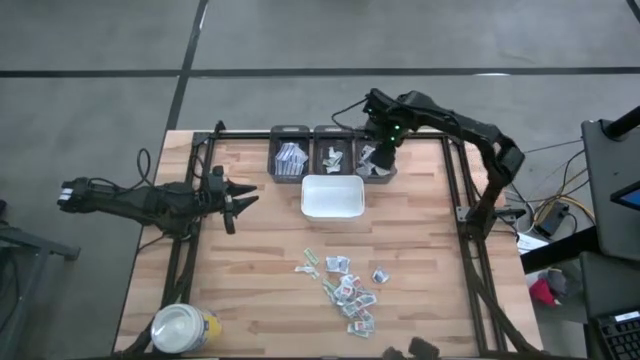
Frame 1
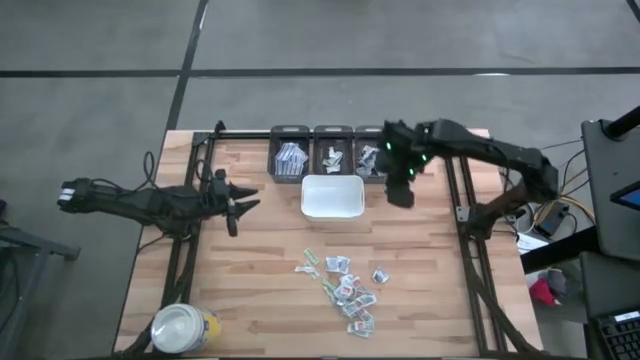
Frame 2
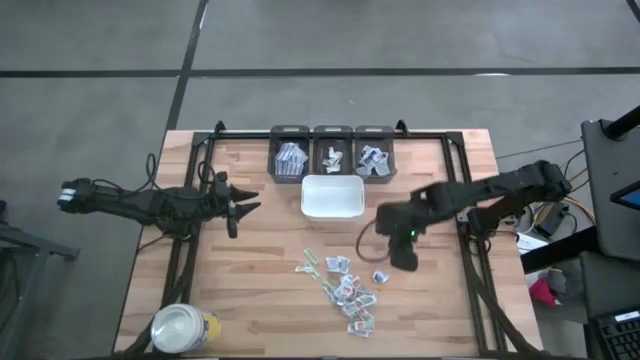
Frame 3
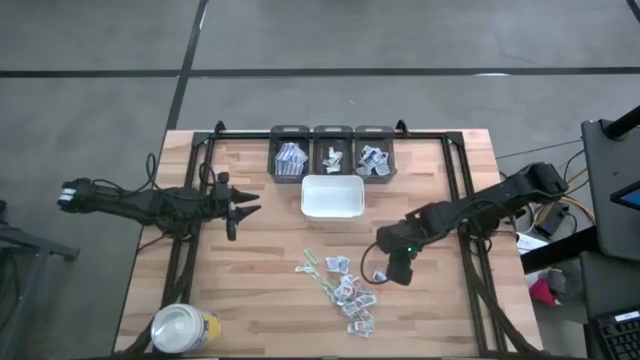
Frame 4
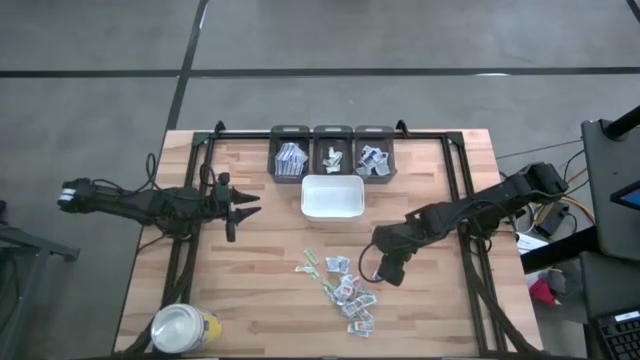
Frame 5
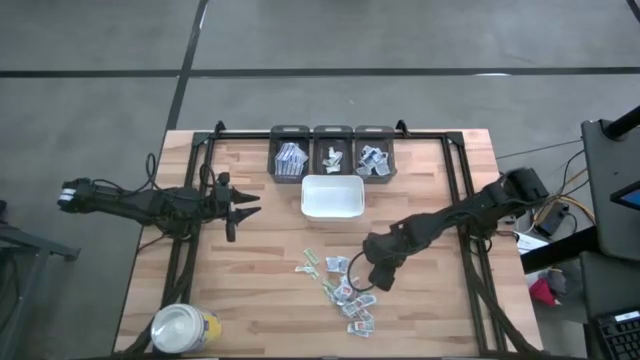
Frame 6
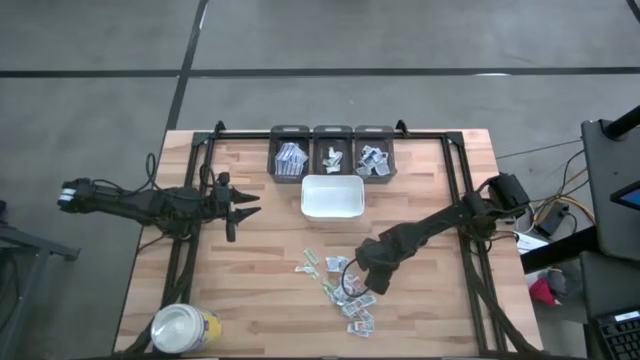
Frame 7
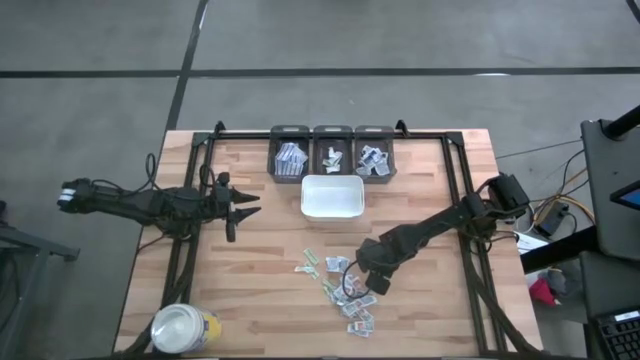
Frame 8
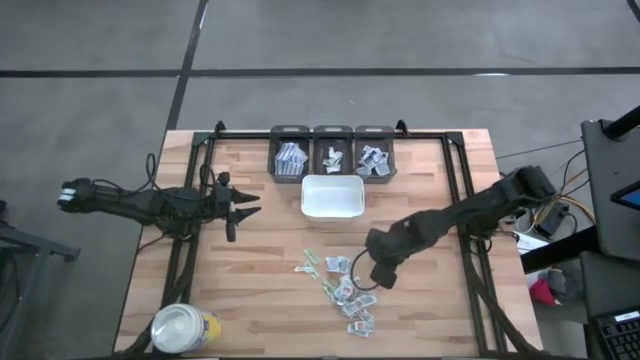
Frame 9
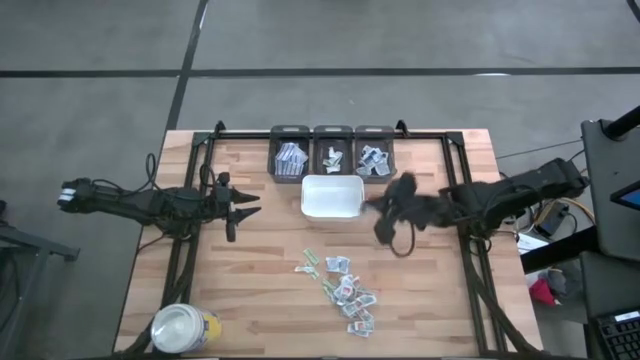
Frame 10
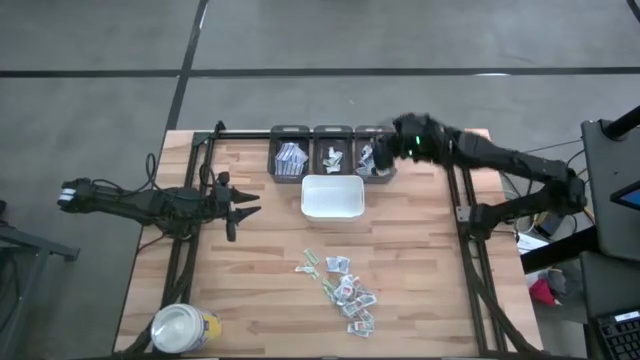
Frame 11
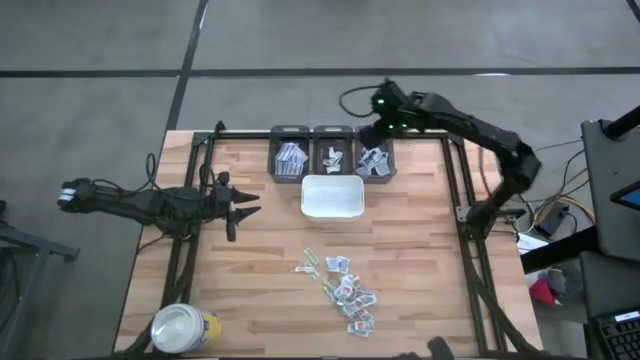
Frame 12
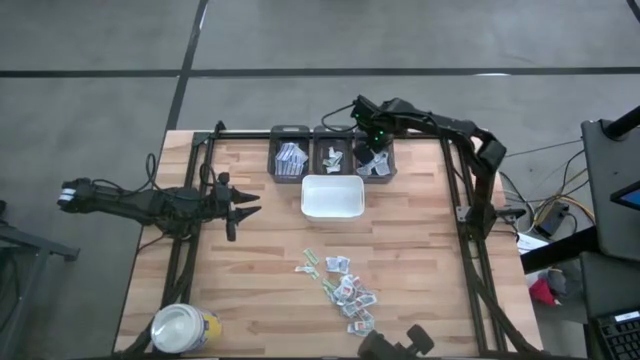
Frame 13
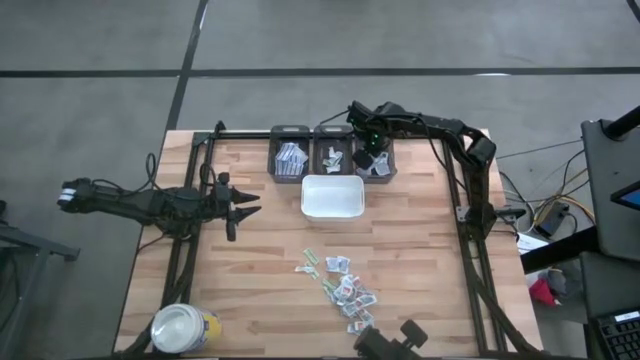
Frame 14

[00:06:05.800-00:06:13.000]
Task: Pick & Place First Aid Supplies
Put the white alcohol pad into the right black bin

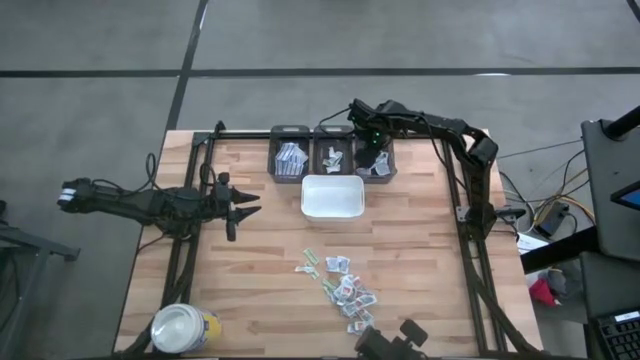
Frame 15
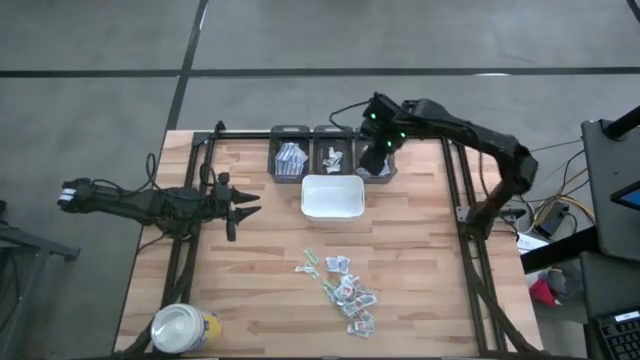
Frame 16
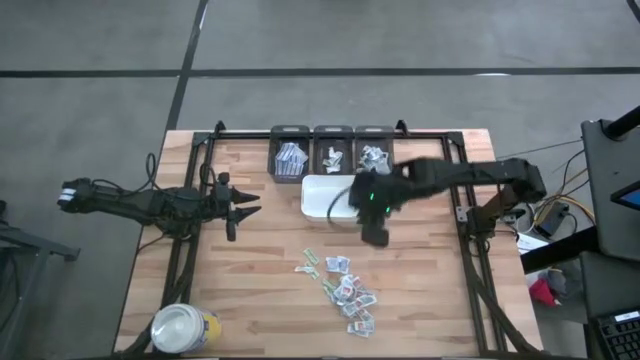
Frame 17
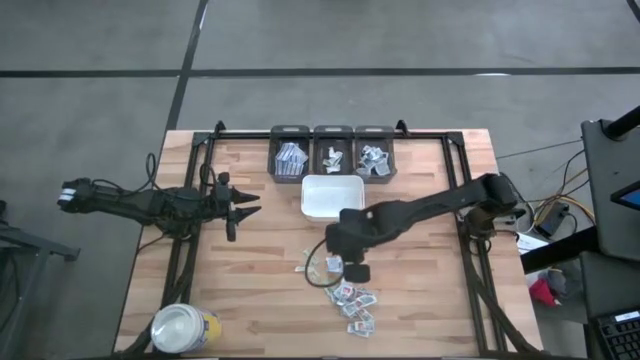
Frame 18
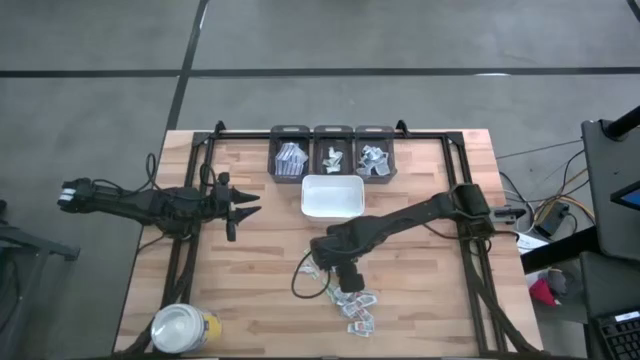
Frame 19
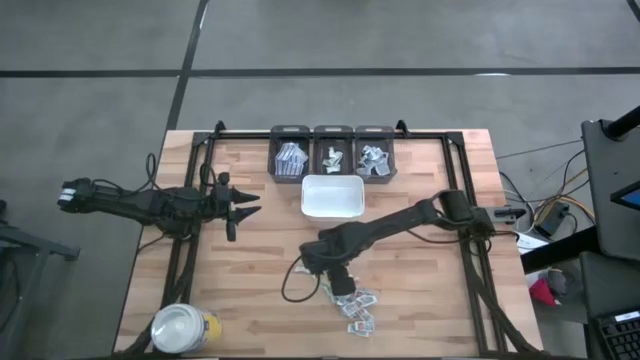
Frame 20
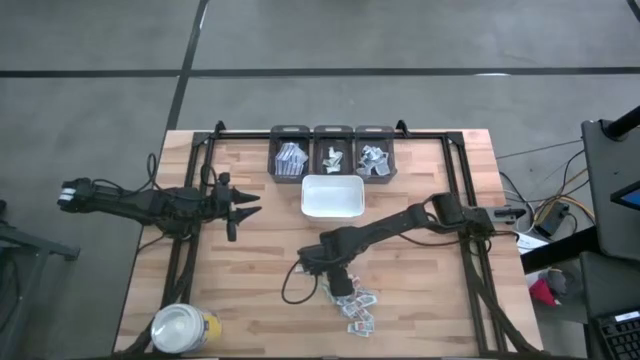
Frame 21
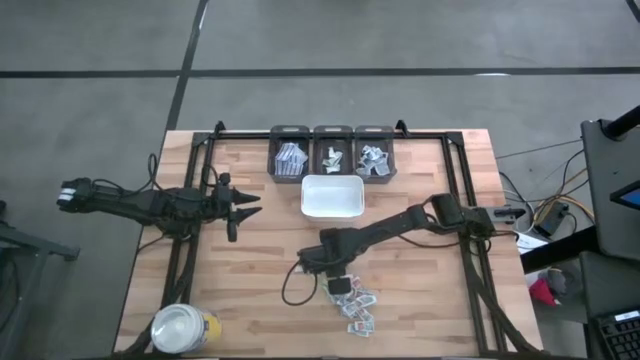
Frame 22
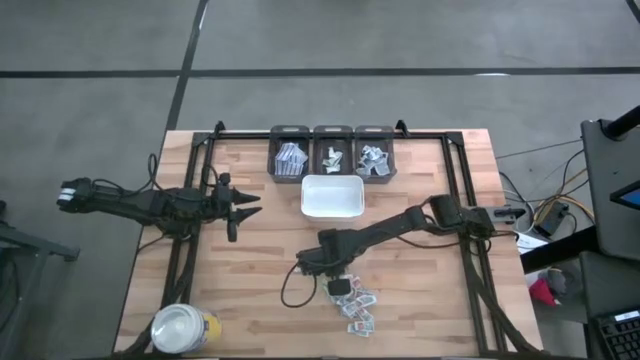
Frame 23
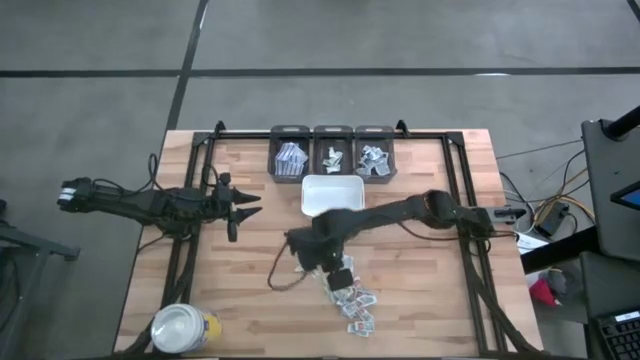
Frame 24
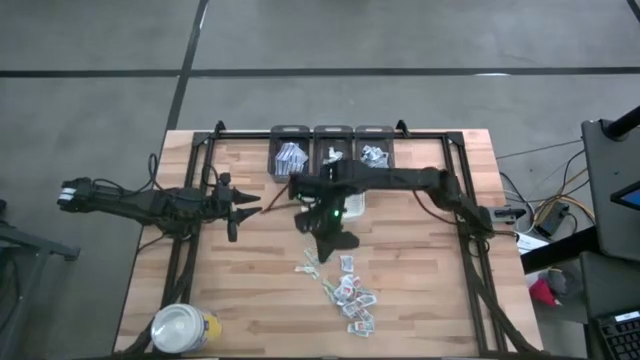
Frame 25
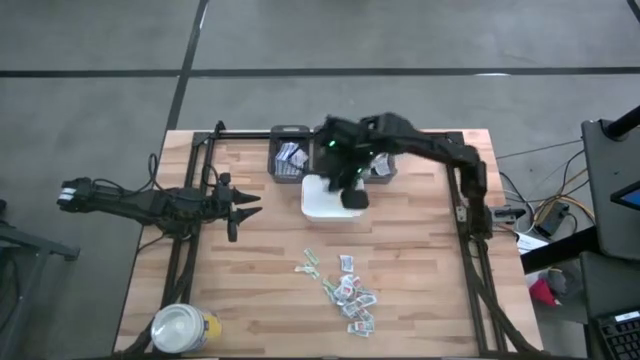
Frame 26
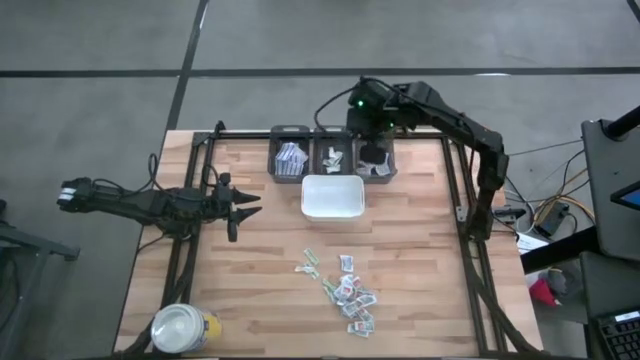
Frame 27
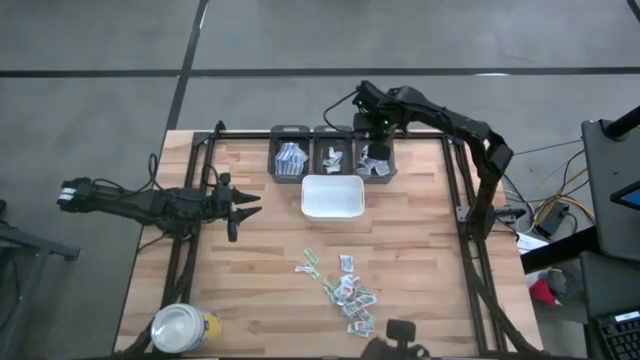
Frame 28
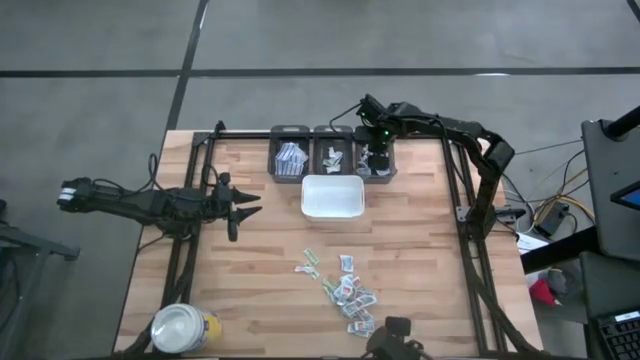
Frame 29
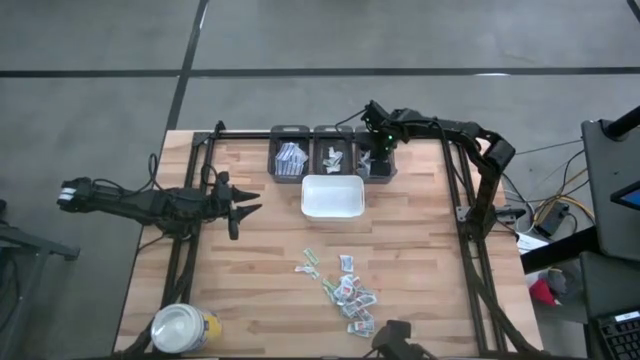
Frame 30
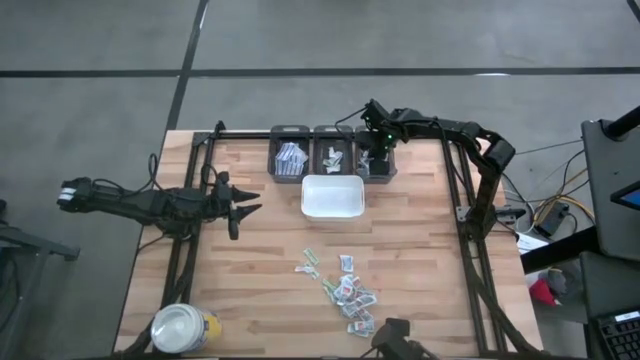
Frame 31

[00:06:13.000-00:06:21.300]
Put the white alcohol pad into the right black bin

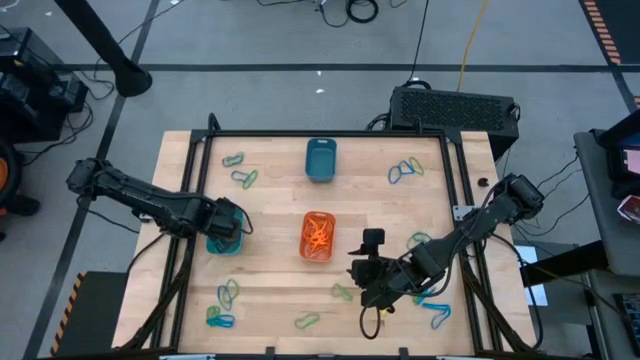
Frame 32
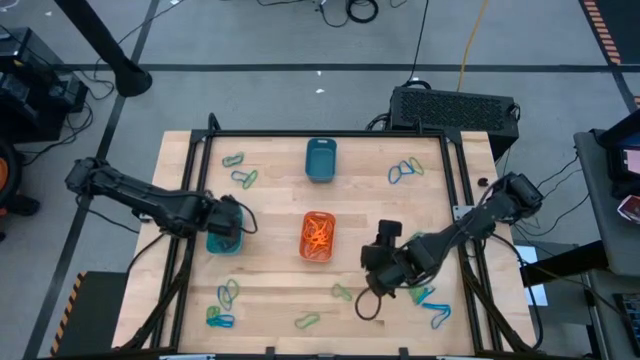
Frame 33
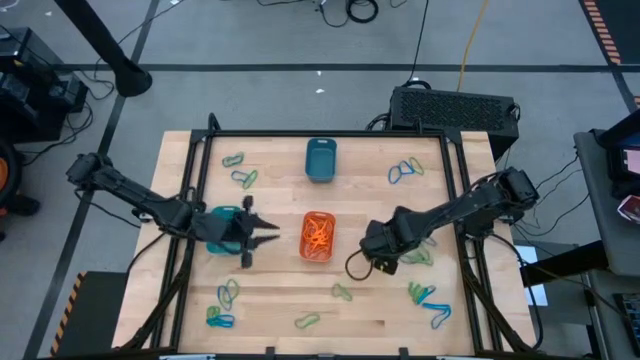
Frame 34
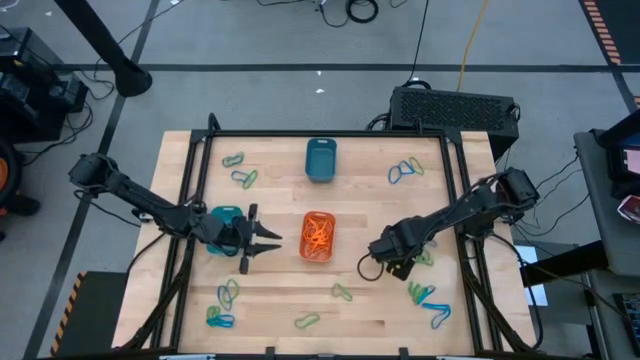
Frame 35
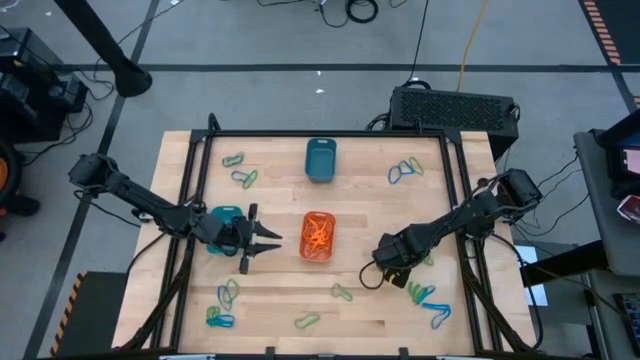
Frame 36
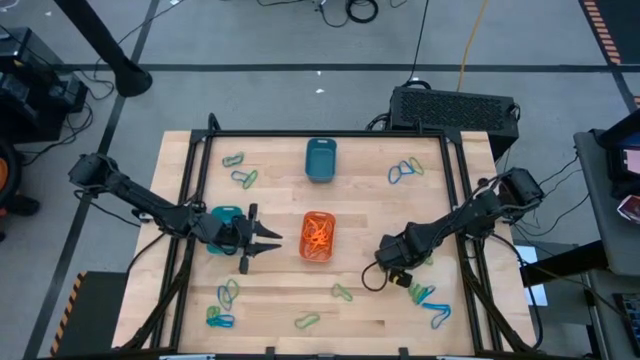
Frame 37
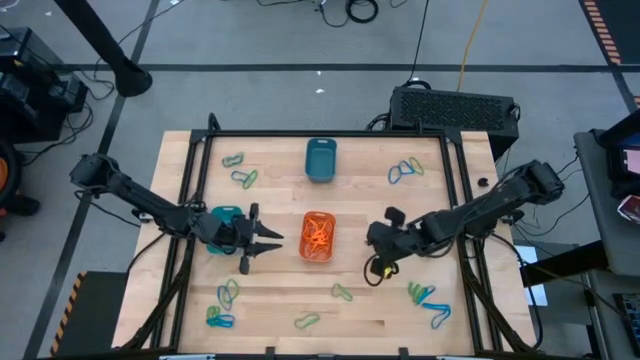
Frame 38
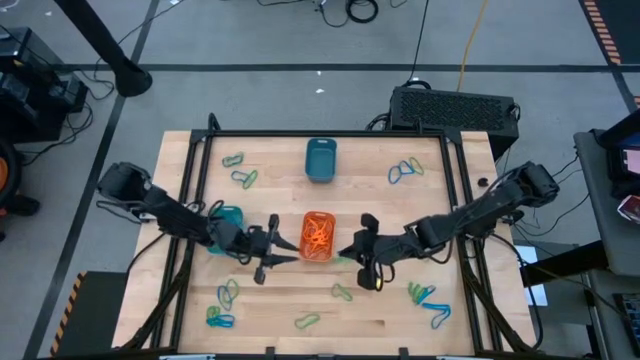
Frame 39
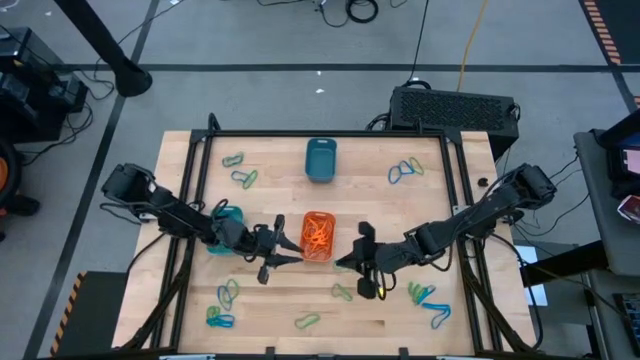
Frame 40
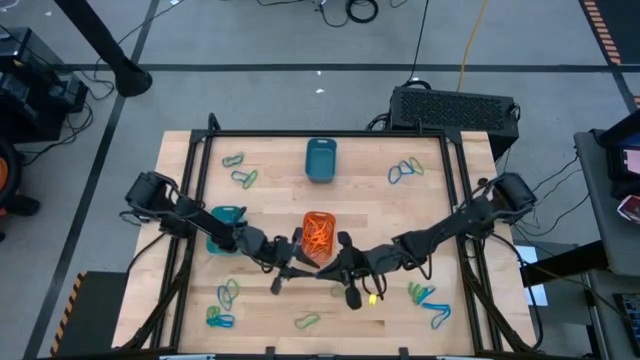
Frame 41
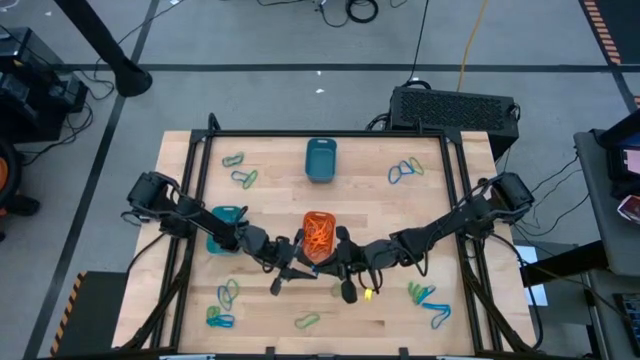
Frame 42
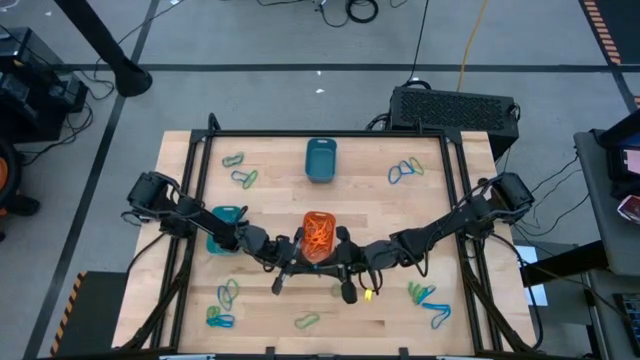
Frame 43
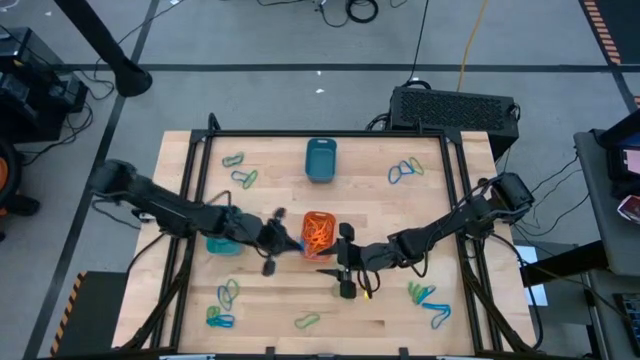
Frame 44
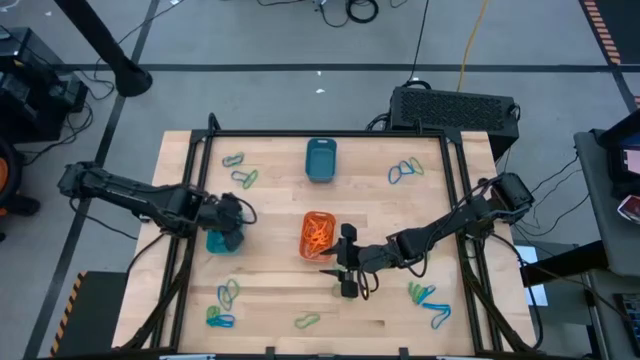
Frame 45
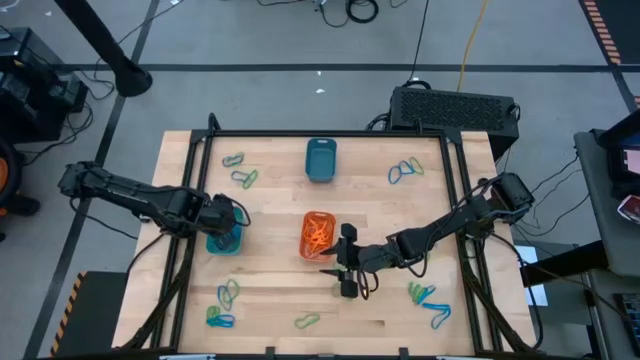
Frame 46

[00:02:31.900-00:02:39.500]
Task: Sort rubber bands into baskets
Put the blue rubber band into the green bin
